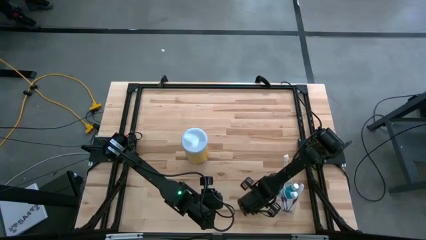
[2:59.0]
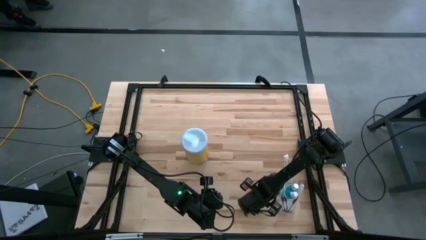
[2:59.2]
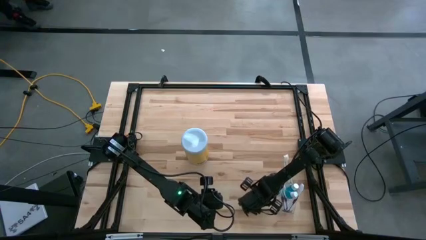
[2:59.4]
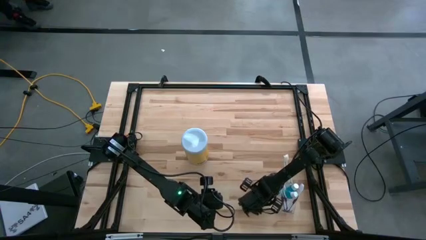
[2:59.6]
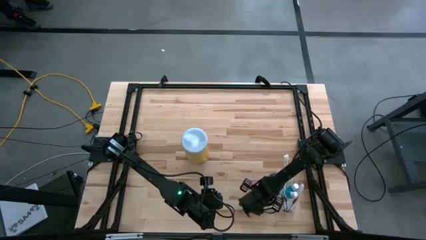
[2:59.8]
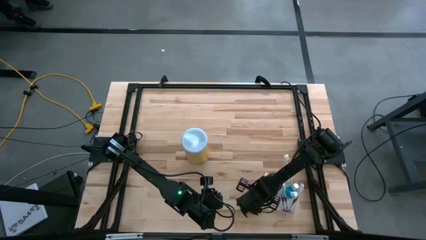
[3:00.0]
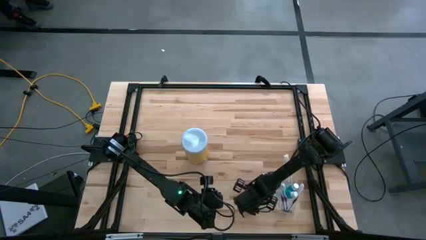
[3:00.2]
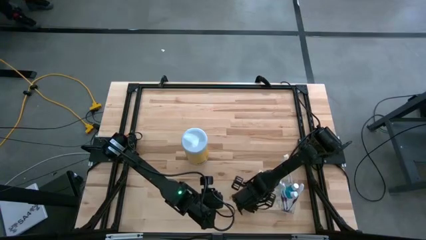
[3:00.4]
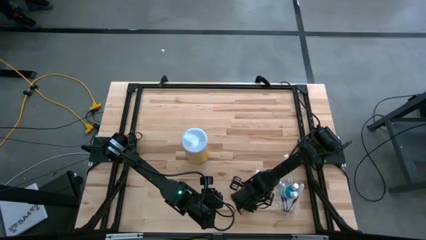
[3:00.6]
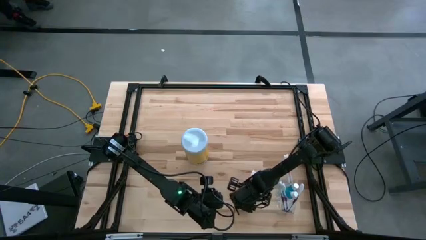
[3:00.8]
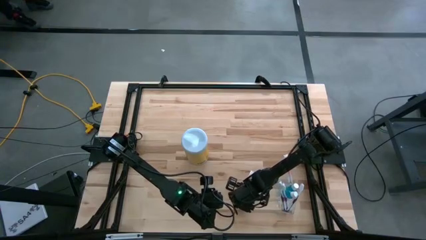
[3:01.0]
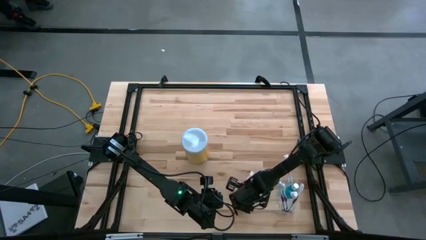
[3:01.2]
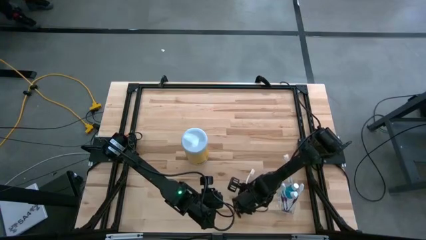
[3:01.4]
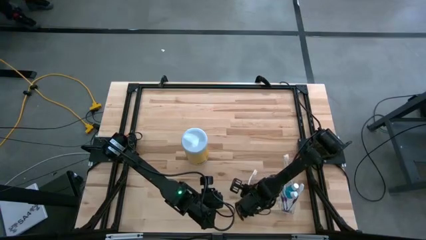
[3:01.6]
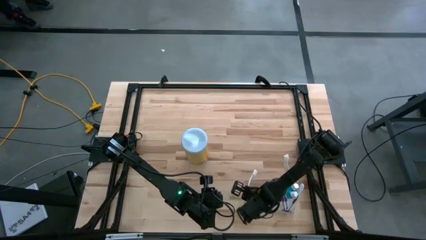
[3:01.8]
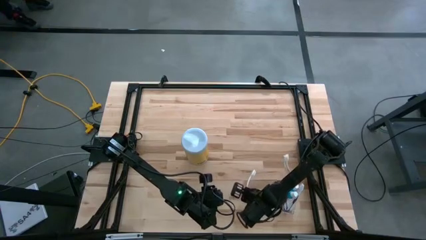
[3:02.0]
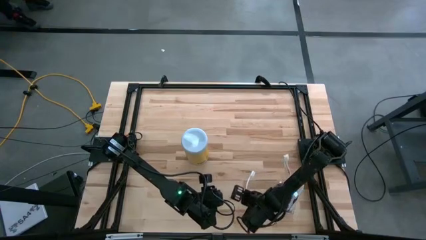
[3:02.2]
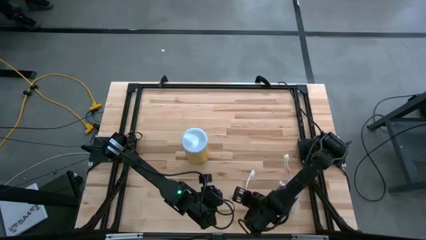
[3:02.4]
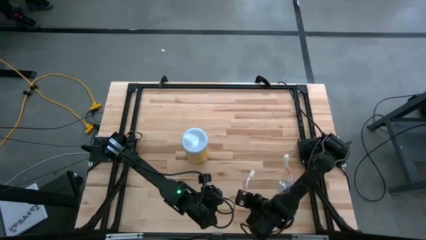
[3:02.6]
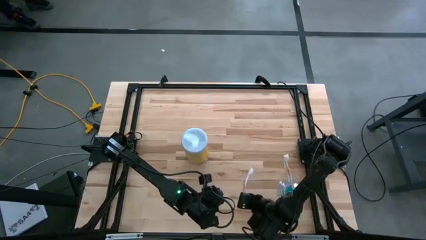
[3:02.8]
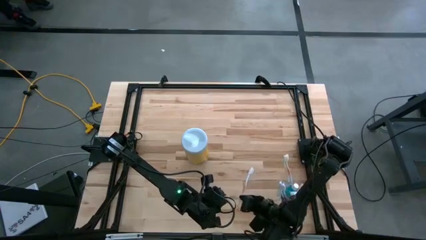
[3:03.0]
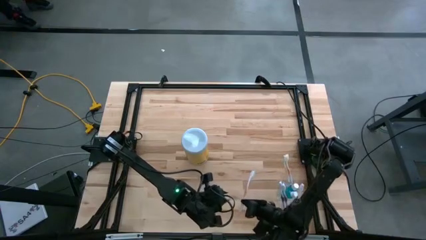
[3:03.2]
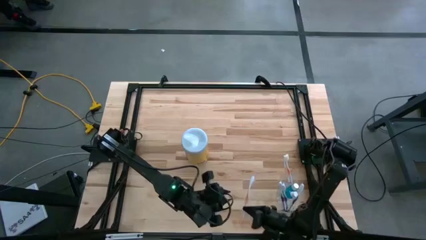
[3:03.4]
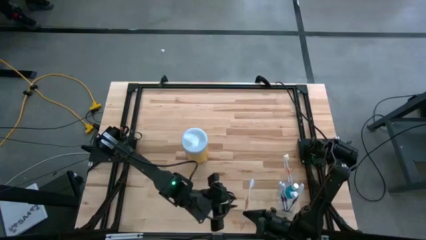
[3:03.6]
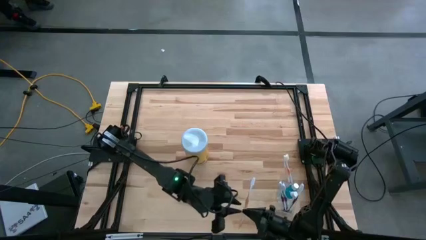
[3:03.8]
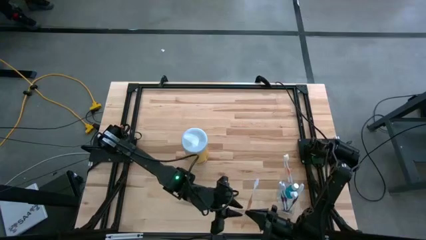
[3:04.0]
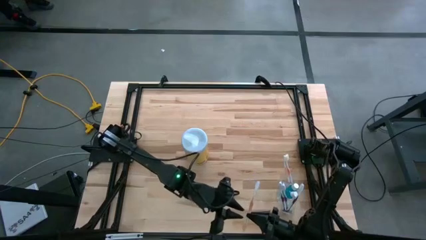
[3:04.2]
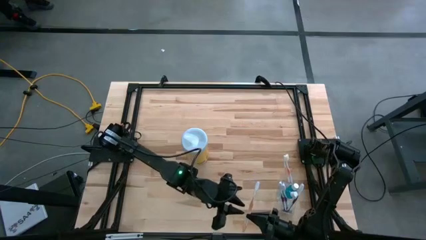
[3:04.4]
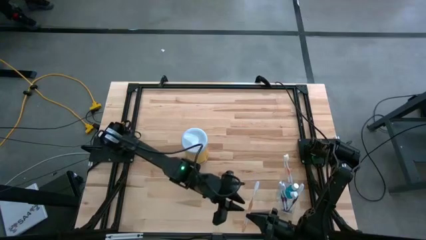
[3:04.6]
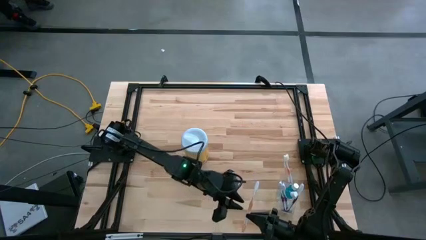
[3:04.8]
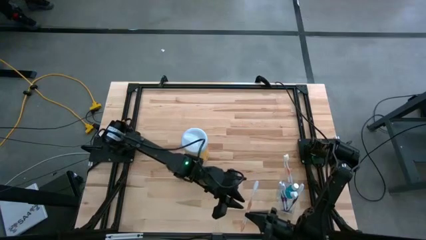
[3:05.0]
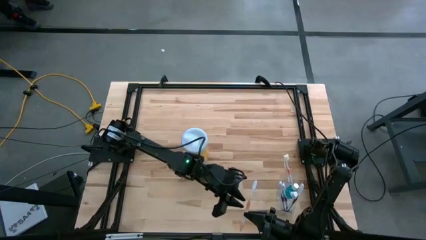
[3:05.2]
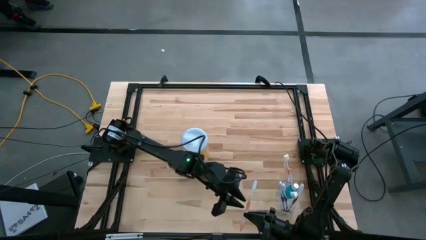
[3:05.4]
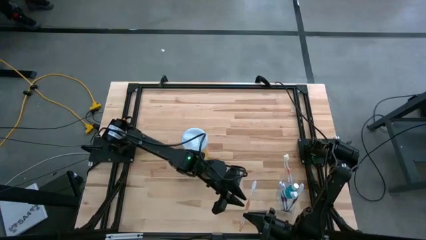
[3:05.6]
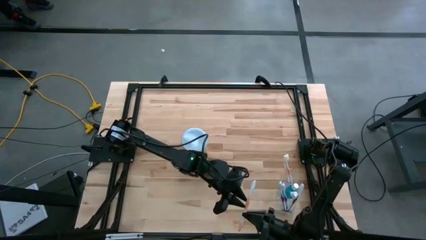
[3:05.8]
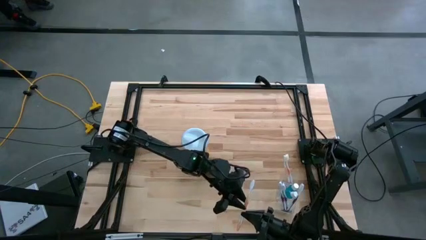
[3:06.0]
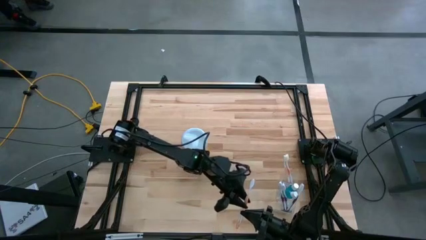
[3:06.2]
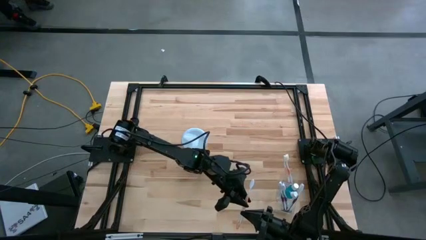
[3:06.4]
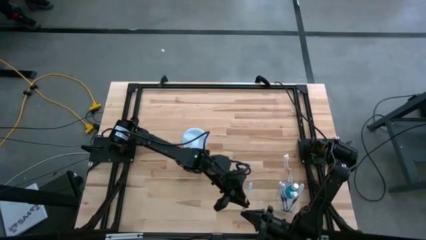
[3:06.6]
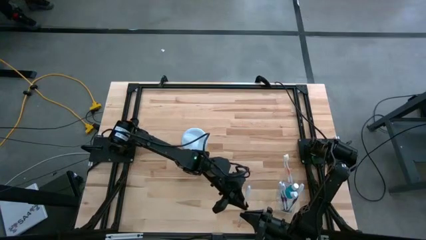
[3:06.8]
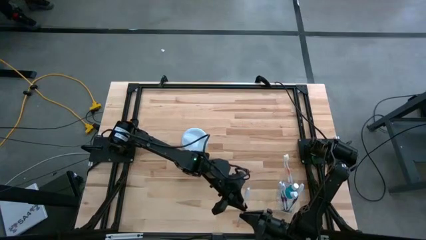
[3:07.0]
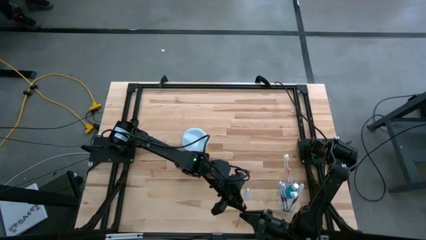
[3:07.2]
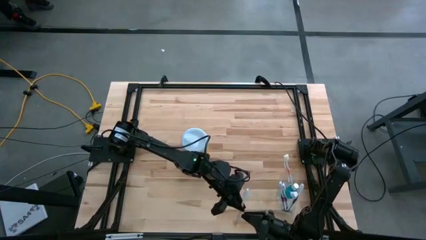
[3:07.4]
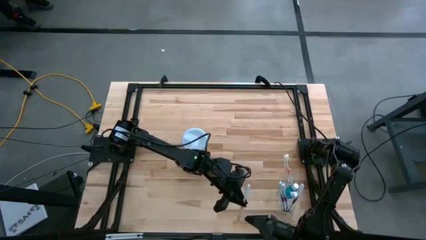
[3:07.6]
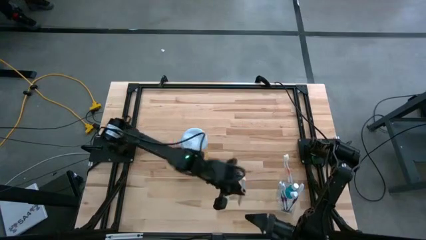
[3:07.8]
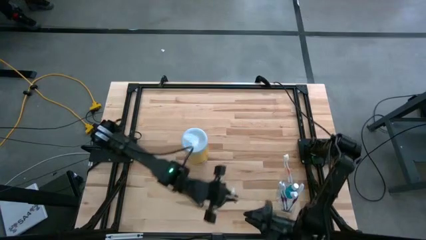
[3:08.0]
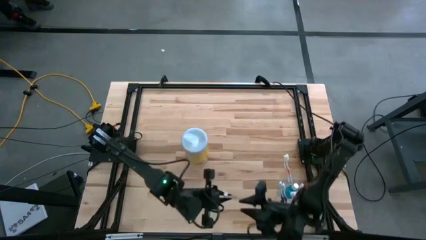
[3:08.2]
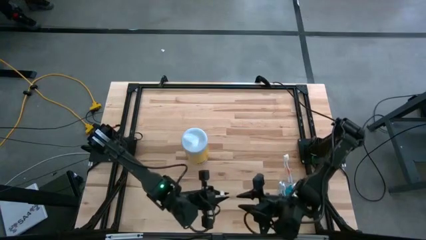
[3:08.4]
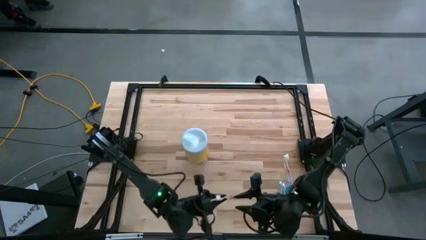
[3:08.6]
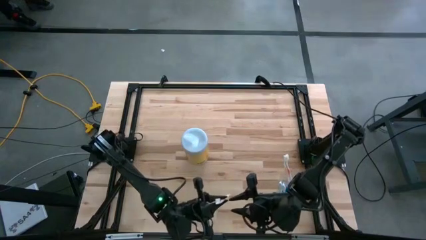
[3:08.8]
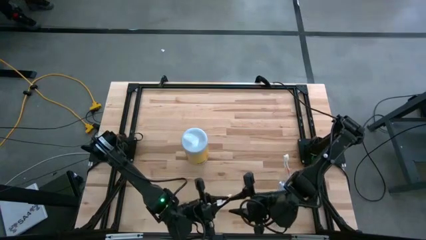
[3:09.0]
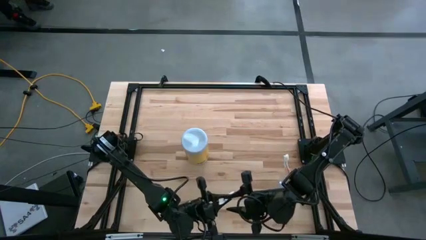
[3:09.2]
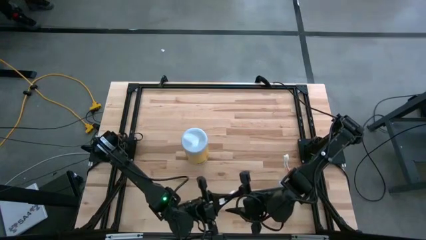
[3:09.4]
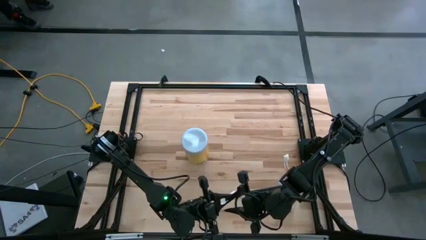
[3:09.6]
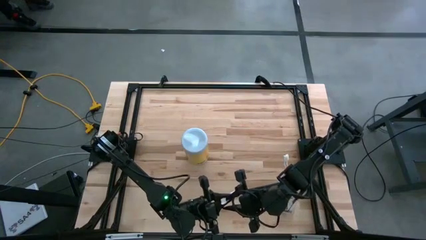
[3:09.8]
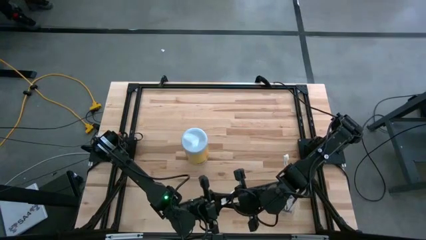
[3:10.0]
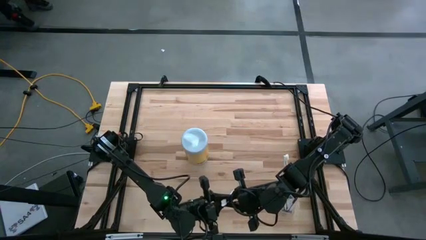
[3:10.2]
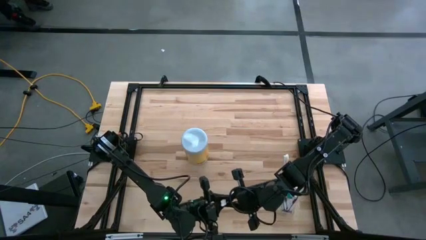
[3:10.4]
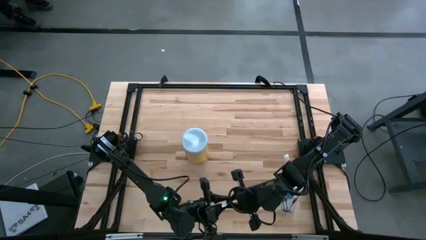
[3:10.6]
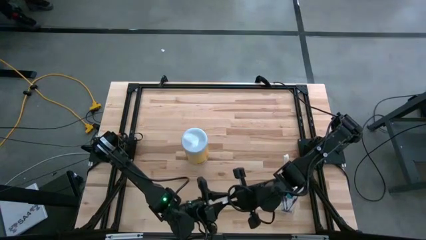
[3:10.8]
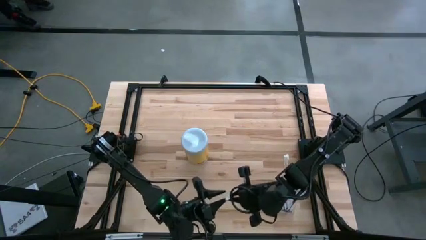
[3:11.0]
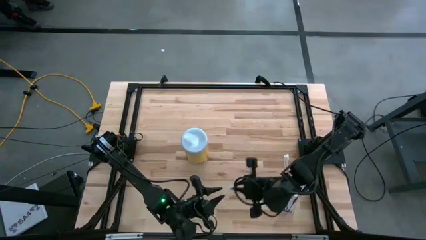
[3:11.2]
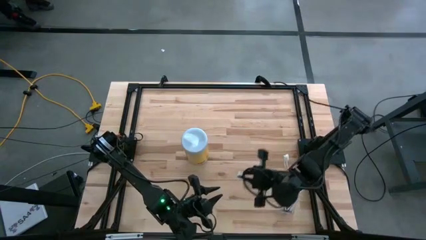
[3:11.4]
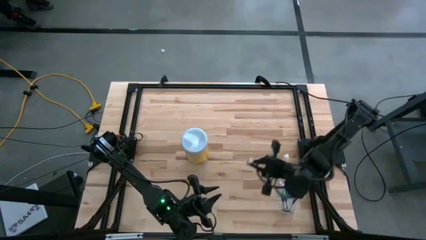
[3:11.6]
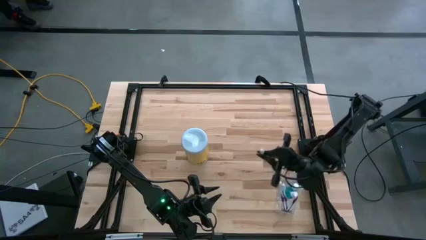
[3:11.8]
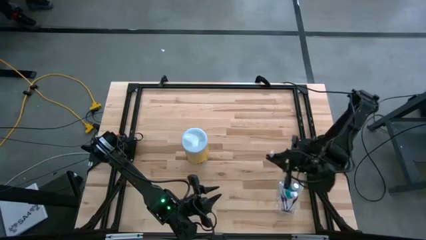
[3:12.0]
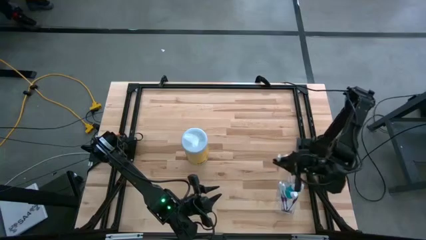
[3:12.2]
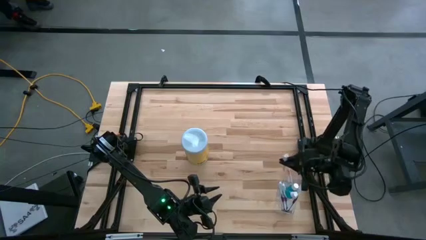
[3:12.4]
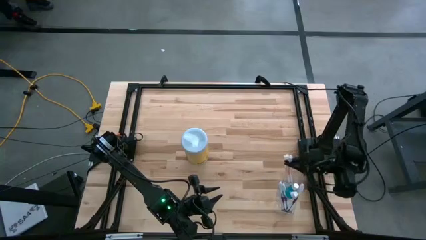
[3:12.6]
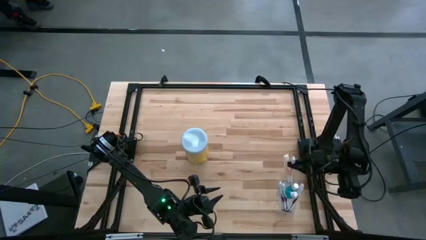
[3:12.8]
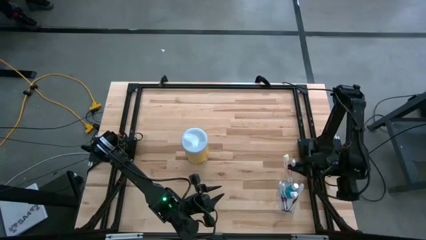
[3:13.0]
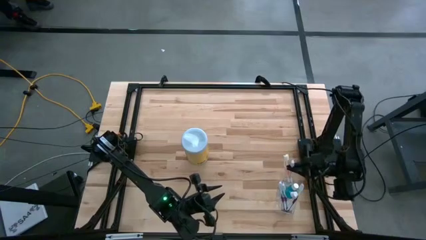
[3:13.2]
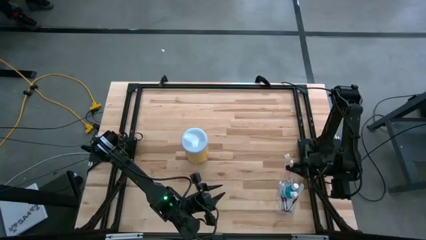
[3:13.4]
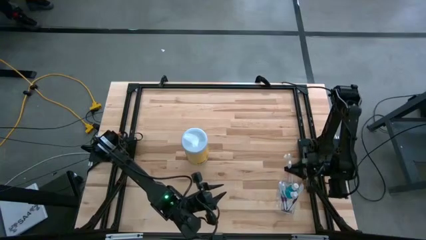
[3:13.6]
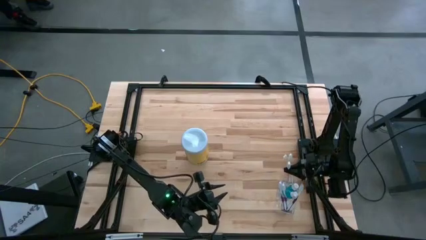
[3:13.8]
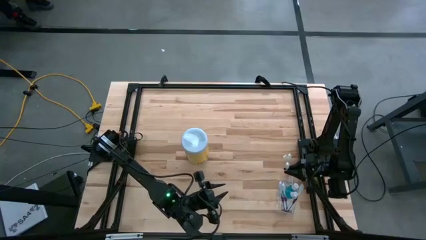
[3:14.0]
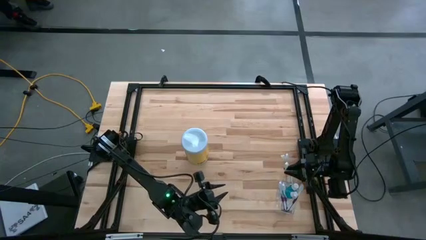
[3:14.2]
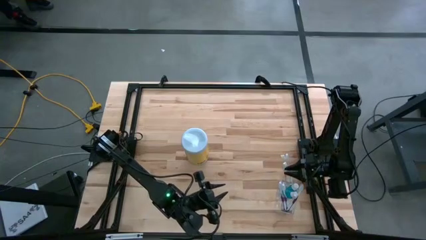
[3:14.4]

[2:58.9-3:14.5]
Task: Pick & Place toothbrushing station
Put the orange toothbrush in the top section of the transparent organizer
